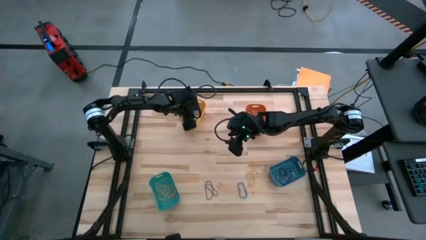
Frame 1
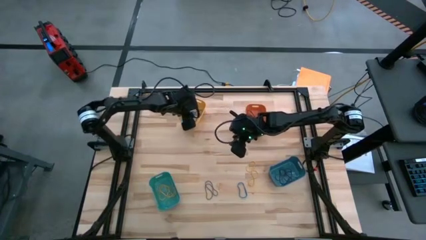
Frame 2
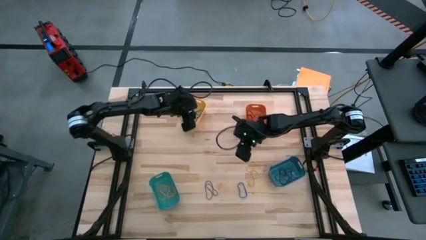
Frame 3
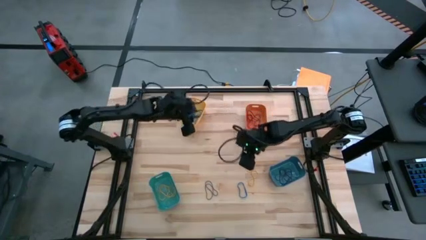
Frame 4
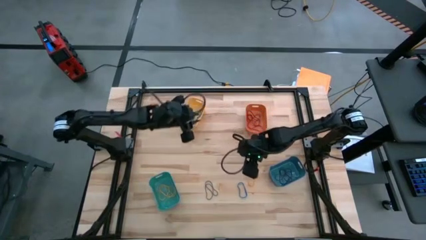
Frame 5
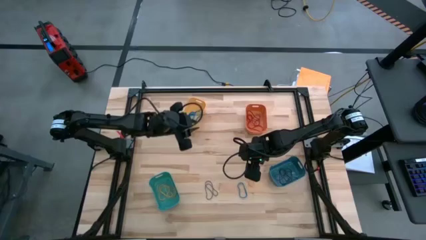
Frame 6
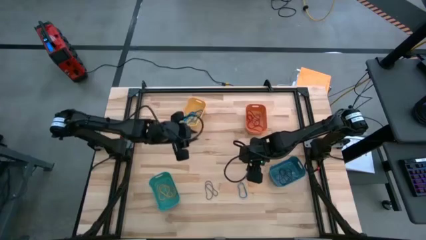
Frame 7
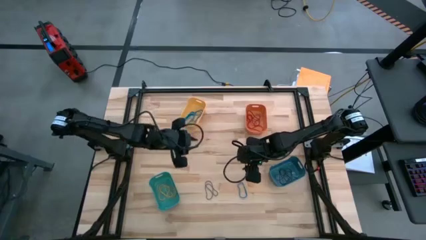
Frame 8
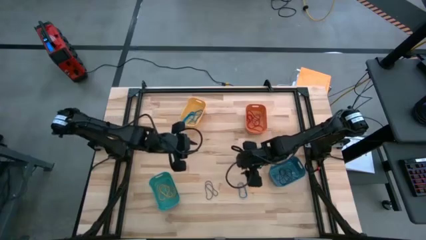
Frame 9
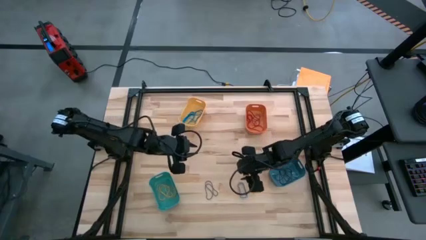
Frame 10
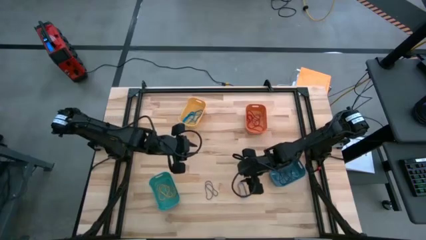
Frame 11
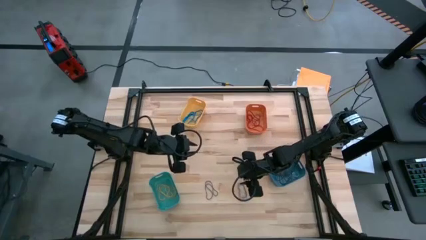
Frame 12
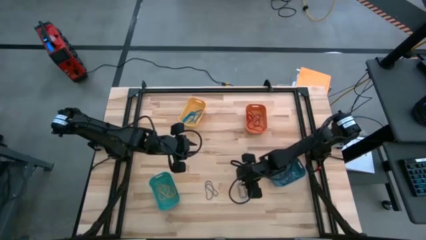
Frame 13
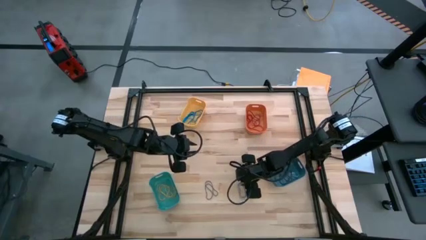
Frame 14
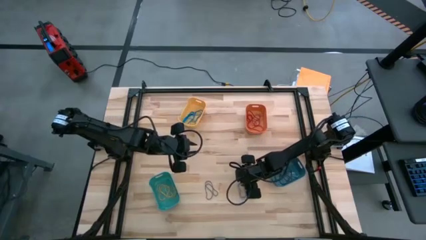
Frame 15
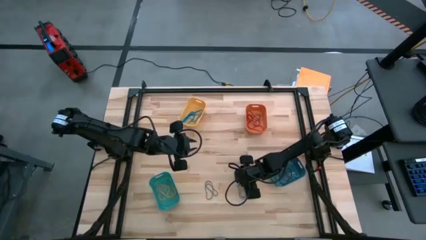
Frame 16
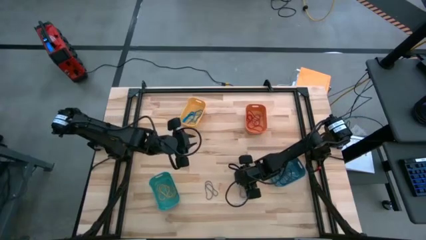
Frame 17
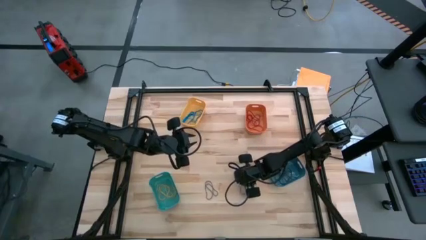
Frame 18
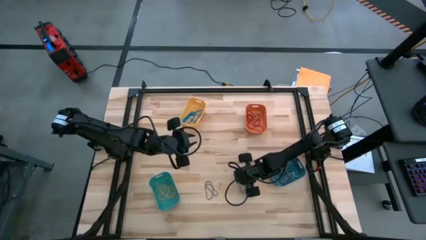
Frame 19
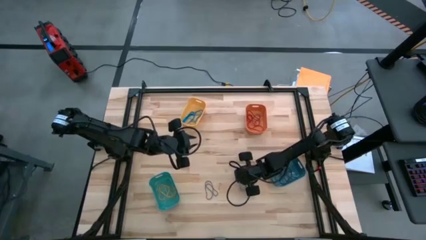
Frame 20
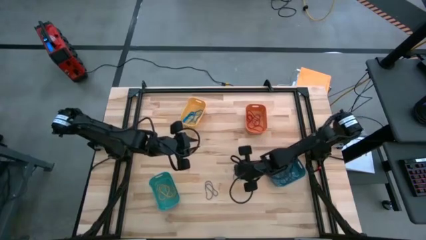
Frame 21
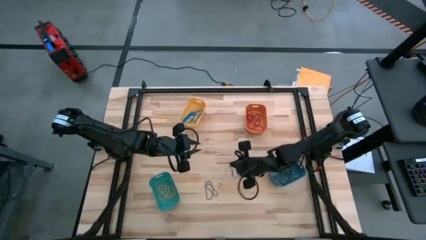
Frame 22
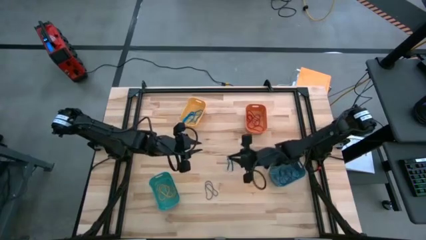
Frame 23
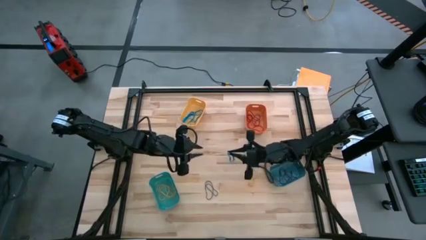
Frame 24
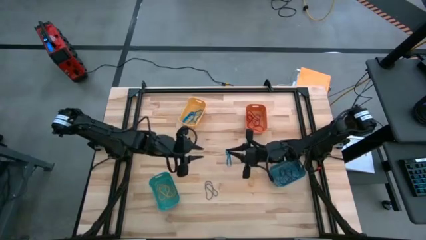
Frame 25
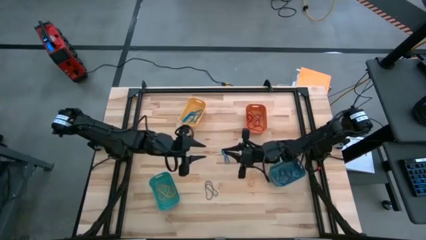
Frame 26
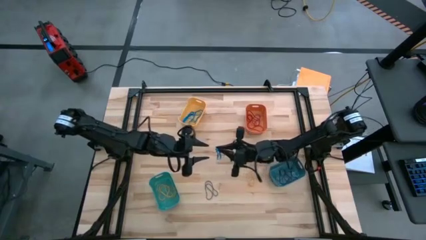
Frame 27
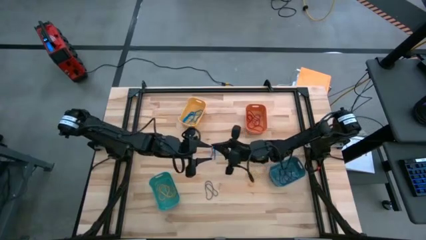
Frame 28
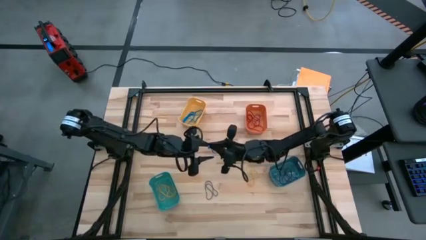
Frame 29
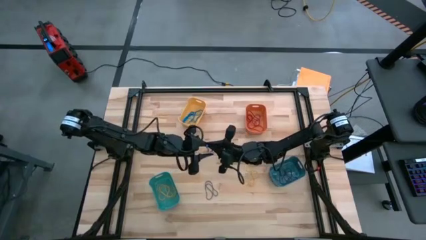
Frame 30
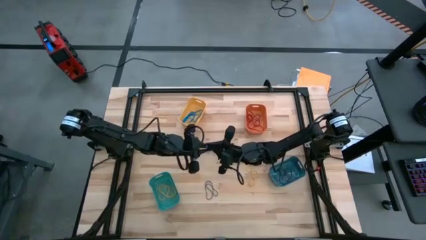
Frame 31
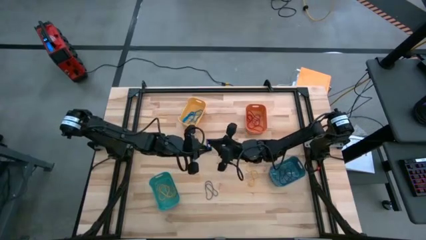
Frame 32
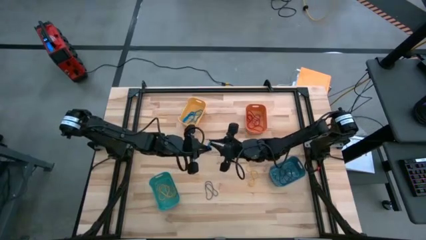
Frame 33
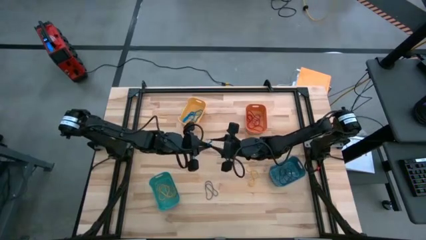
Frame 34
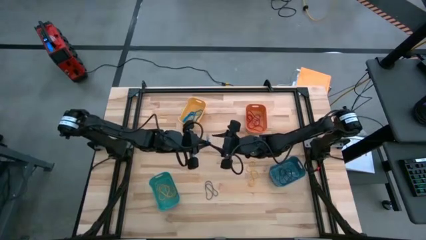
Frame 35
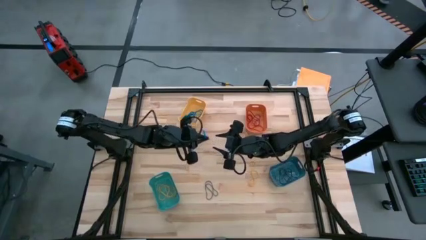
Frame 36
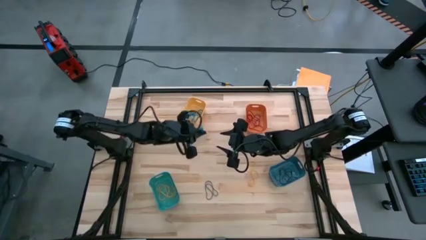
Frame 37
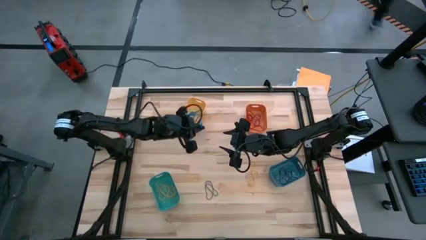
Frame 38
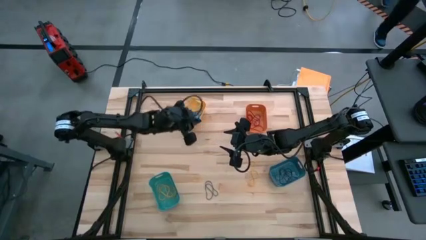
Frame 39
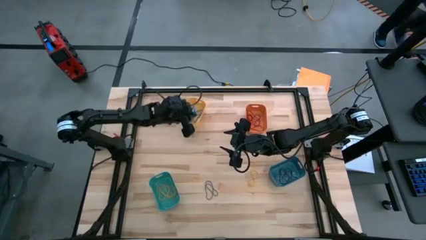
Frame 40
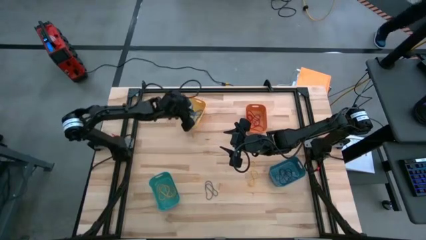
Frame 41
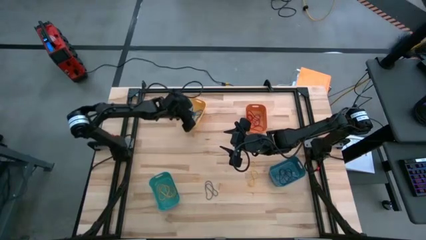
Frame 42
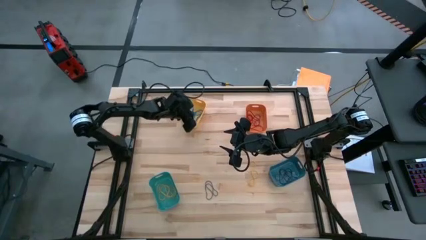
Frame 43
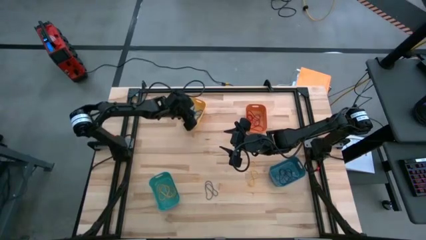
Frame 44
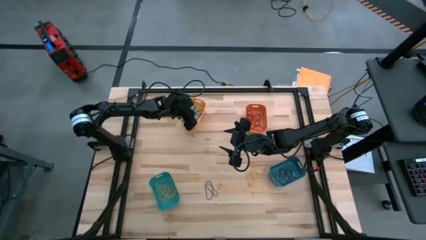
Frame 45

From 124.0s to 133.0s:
Task: Sort rubber bands into baskets
Put the blue rubber band into the yellow bin

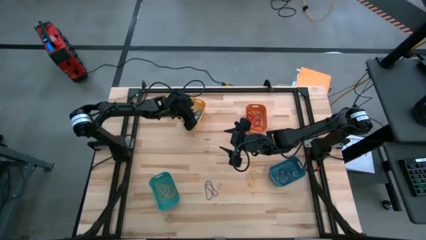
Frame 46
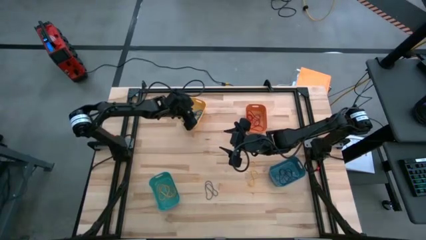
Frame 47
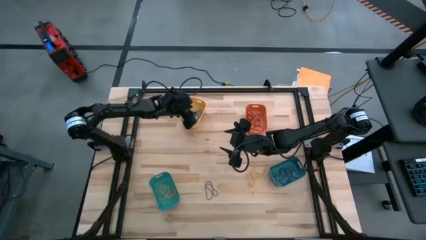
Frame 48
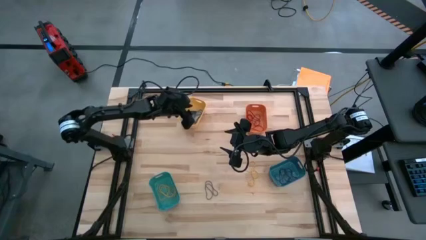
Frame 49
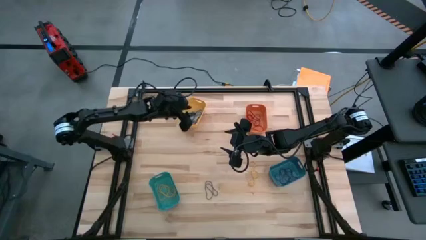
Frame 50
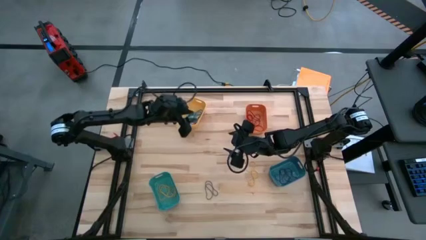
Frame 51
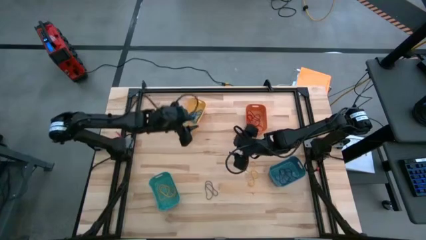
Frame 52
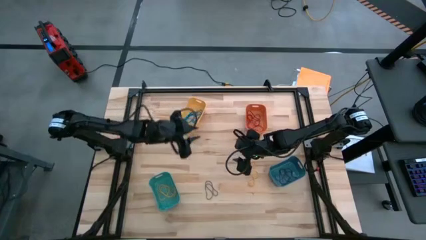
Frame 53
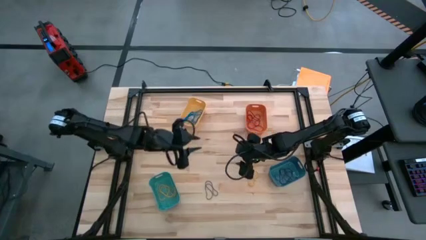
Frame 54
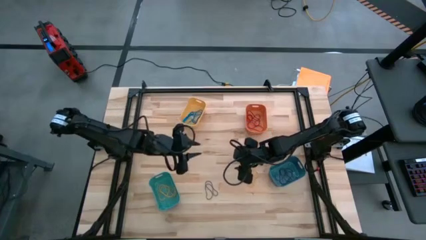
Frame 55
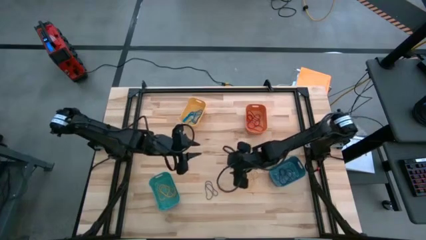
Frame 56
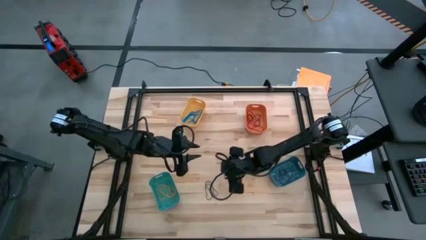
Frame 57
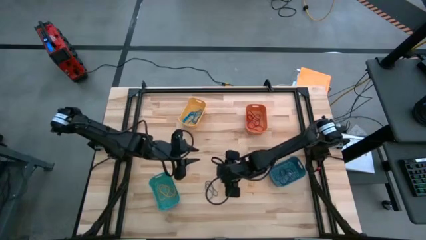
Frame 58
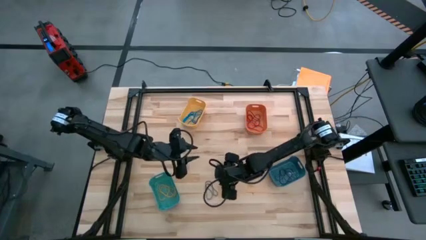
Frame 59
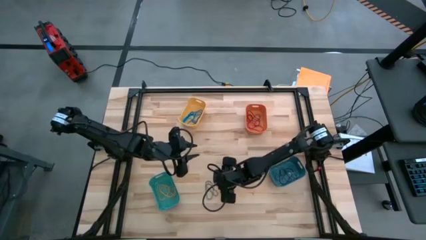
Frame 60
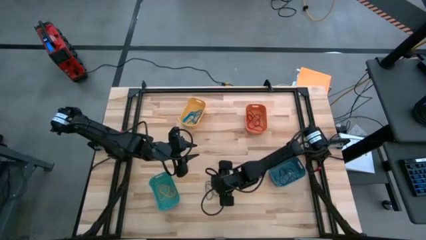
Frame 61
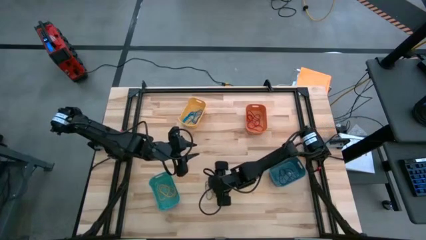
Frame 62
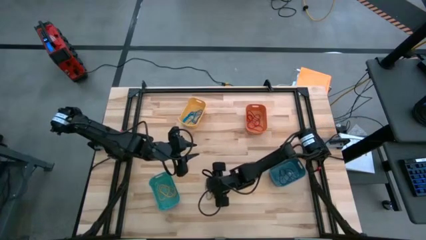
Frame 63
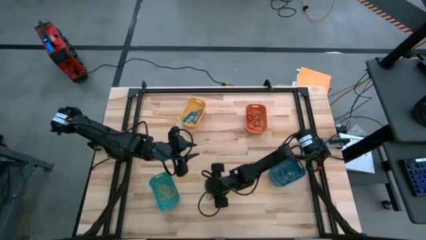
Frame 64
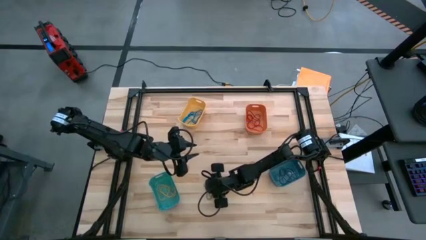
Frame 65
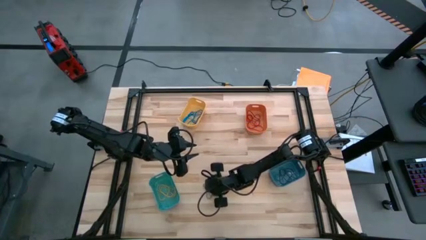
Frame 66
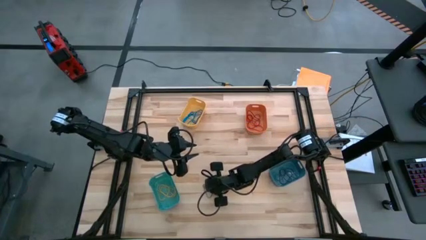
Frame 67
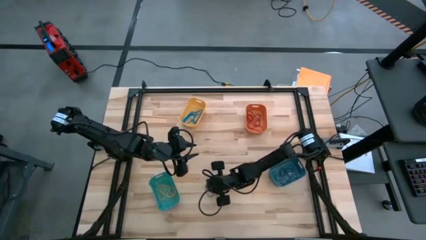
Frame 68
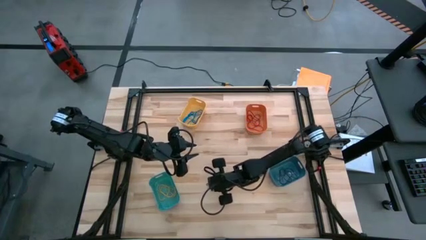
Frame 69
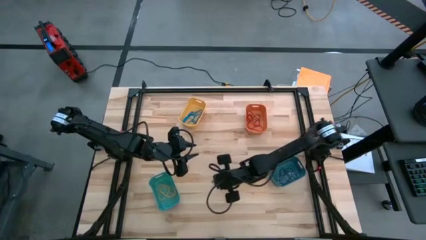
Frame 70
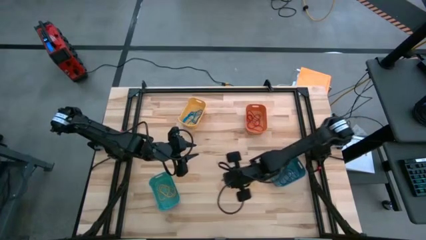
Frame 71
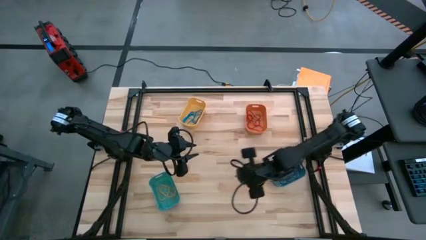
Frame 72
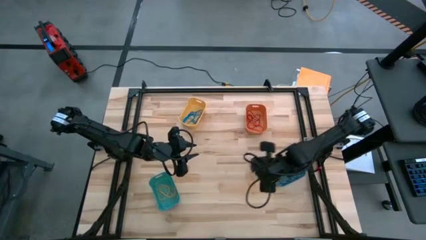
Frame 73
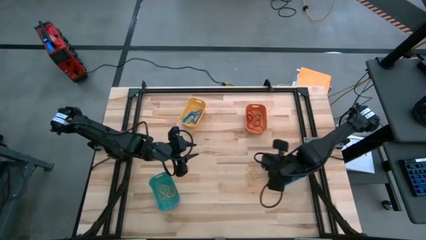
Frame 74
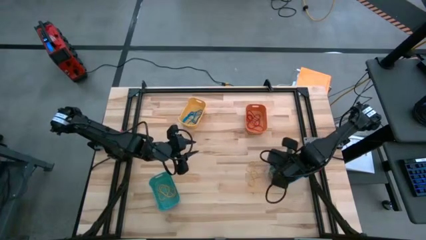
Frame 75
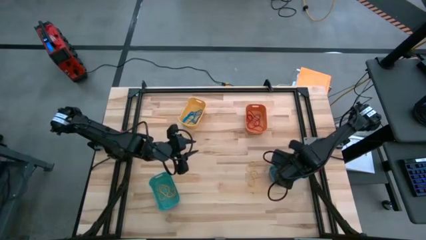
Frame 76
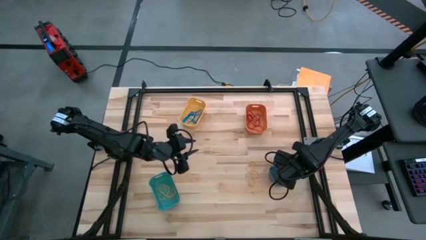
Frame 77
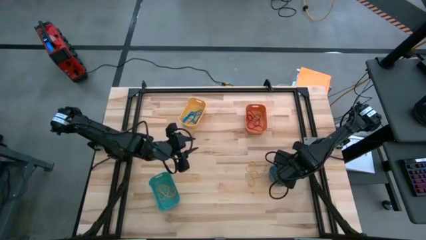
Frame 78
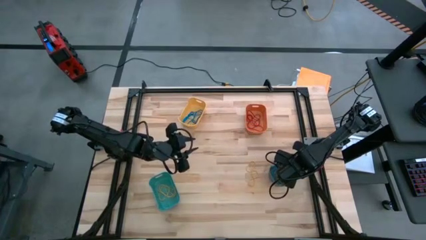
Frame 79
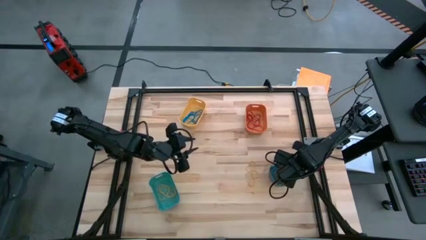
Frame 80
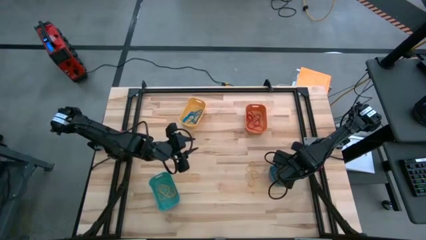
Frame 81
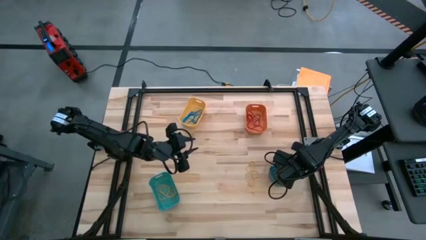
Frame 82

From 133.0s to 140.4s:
Put the violet rubber band into the blue bin
